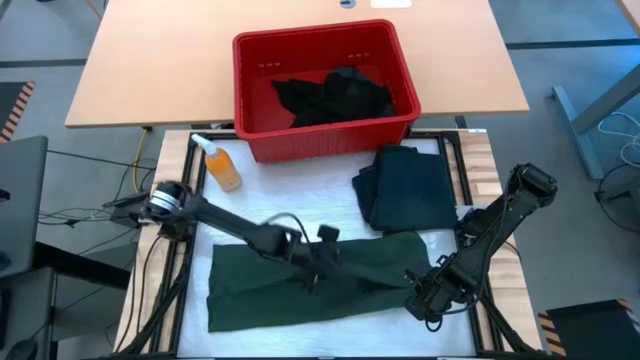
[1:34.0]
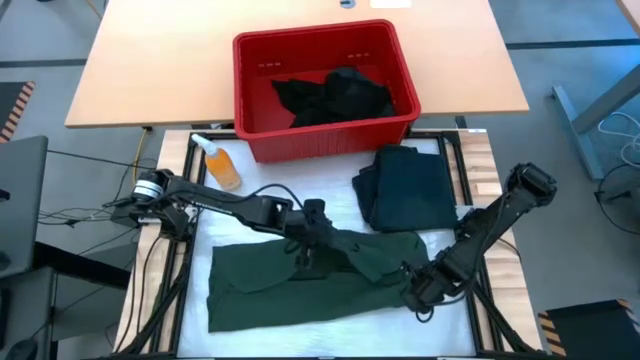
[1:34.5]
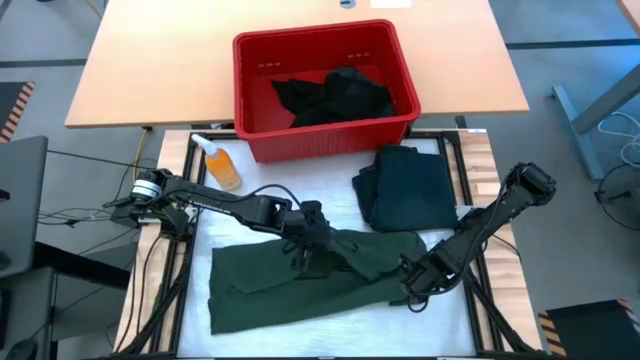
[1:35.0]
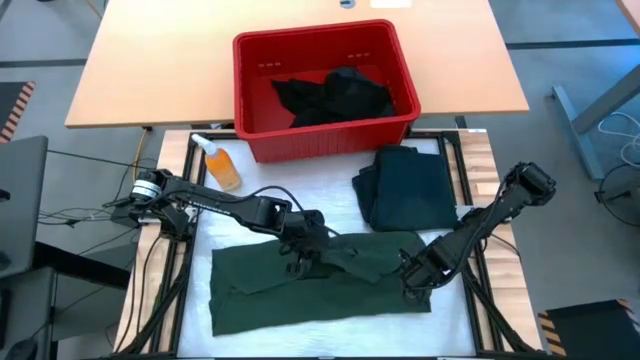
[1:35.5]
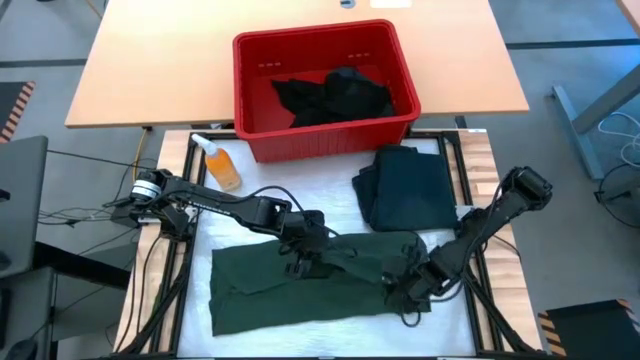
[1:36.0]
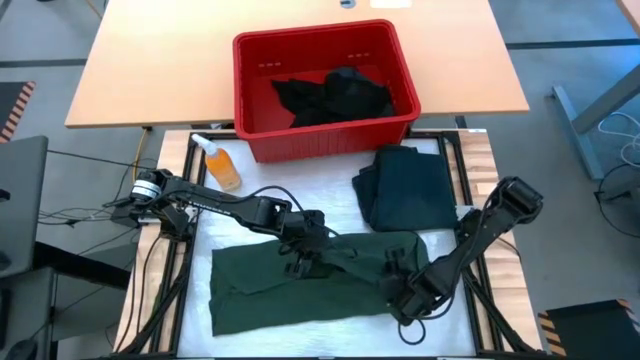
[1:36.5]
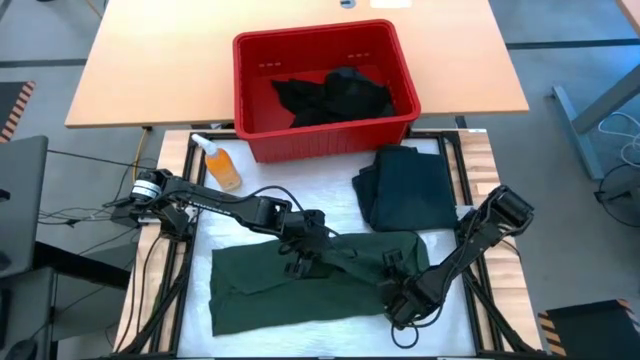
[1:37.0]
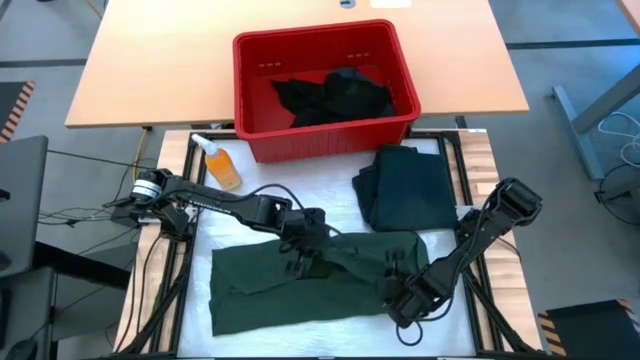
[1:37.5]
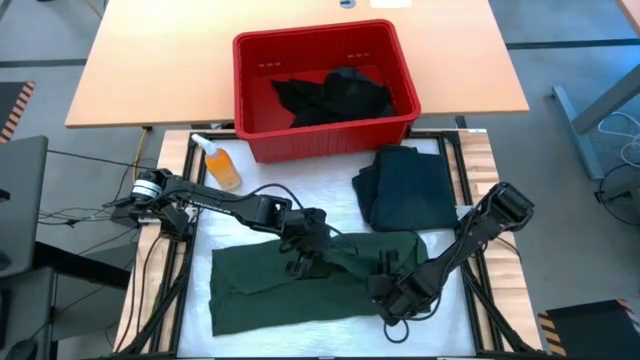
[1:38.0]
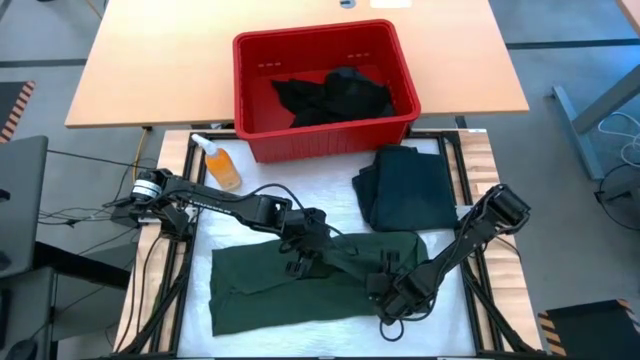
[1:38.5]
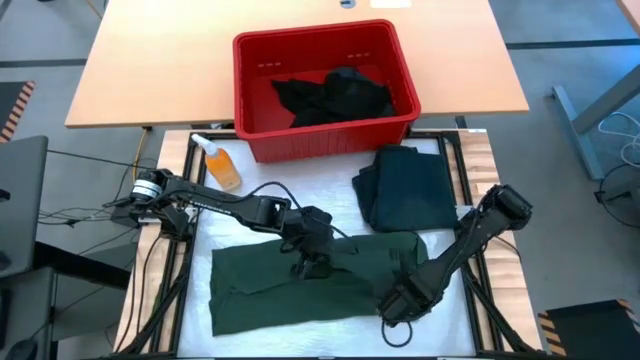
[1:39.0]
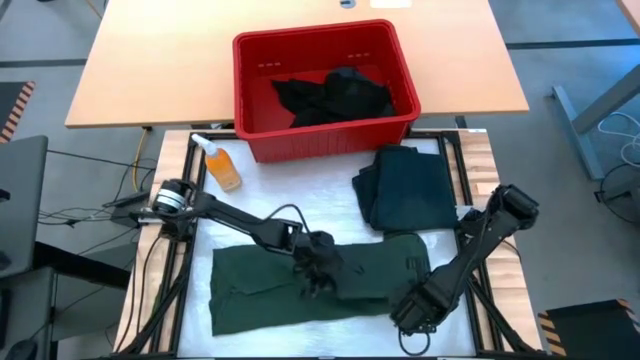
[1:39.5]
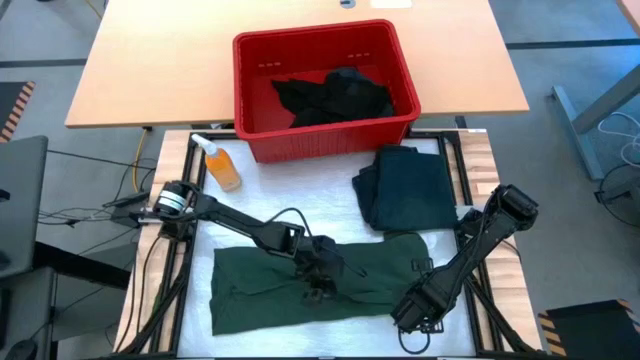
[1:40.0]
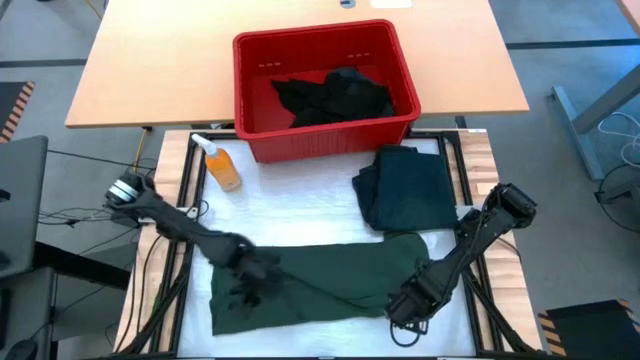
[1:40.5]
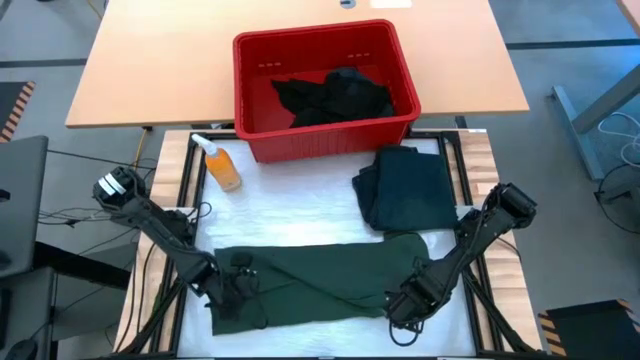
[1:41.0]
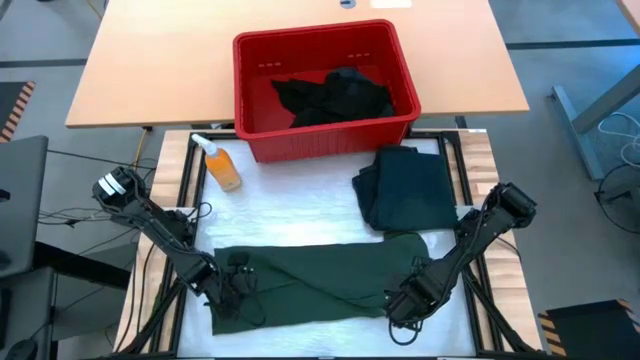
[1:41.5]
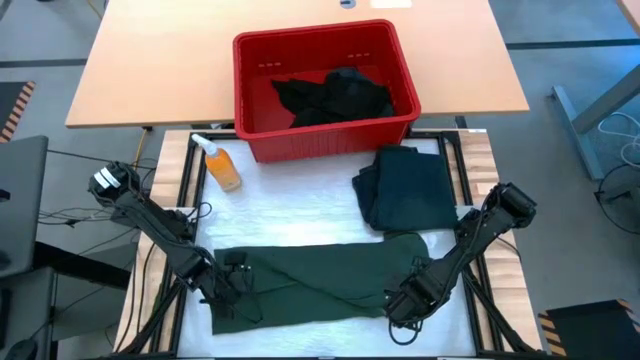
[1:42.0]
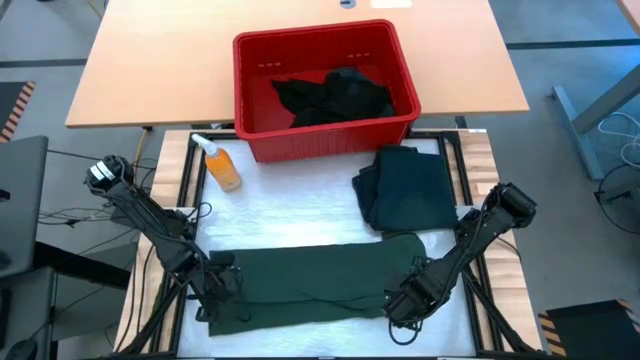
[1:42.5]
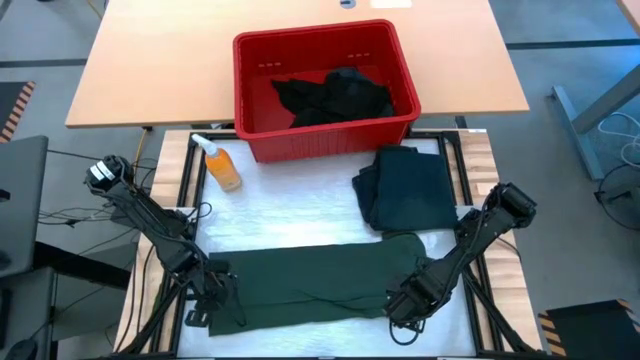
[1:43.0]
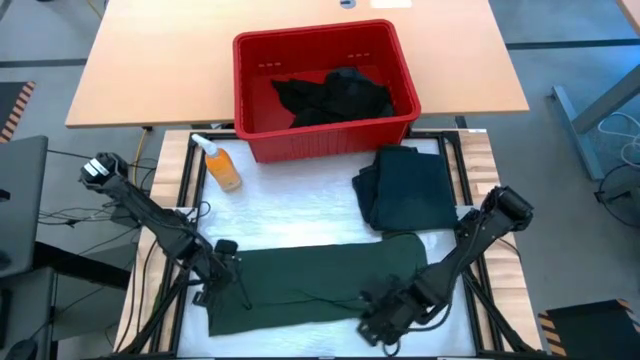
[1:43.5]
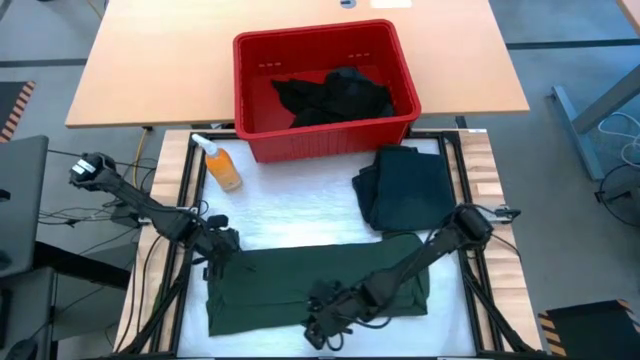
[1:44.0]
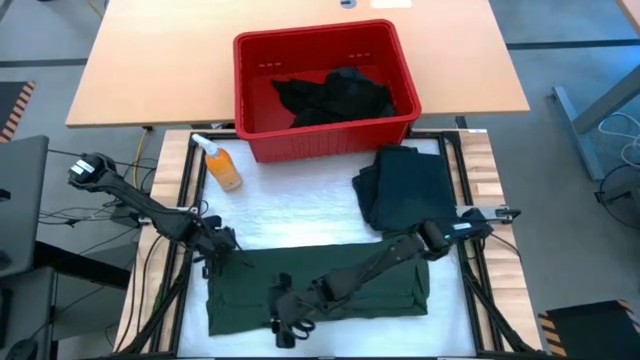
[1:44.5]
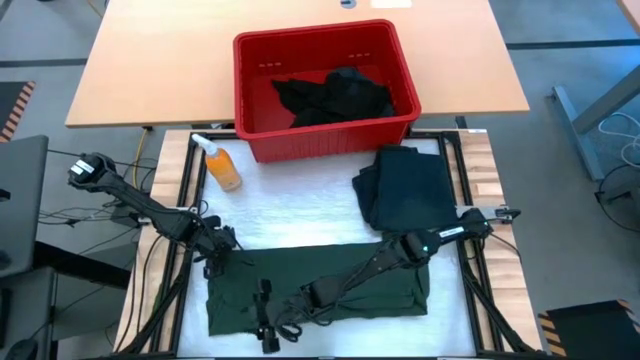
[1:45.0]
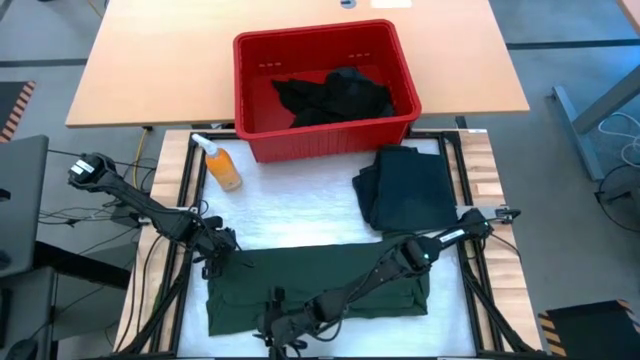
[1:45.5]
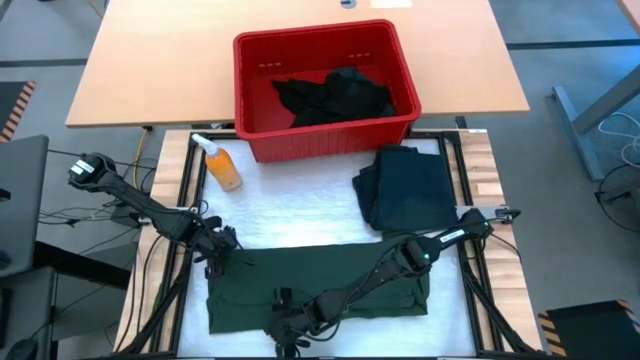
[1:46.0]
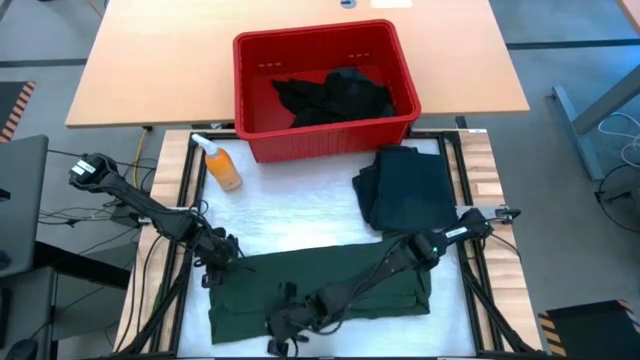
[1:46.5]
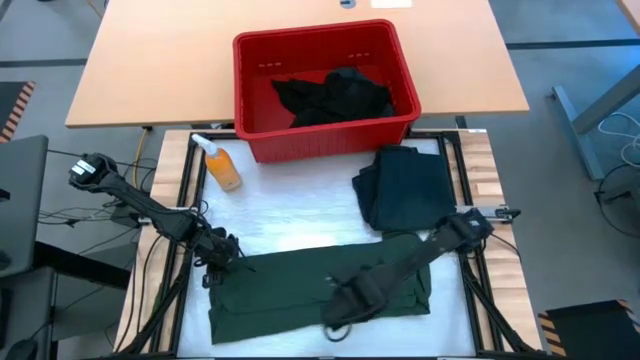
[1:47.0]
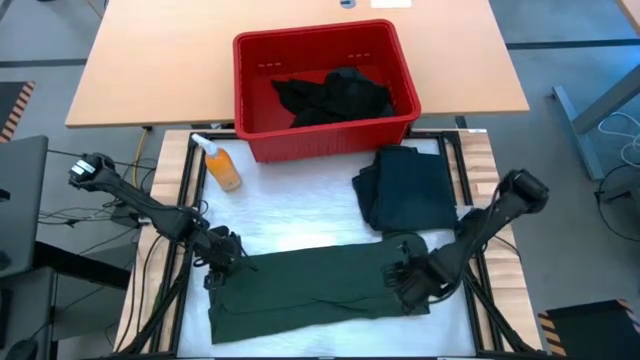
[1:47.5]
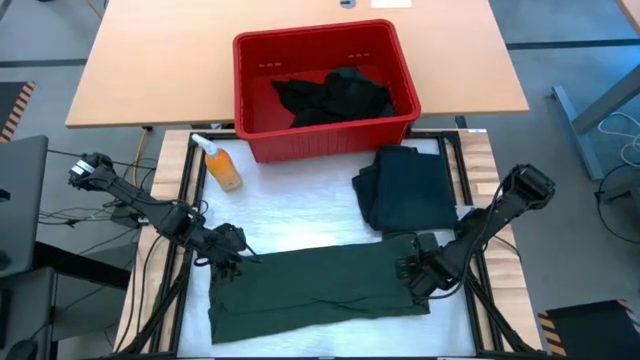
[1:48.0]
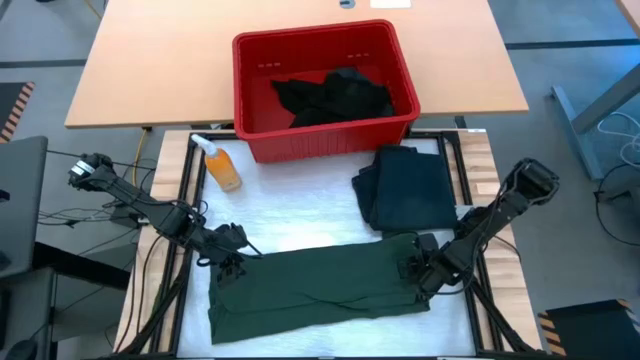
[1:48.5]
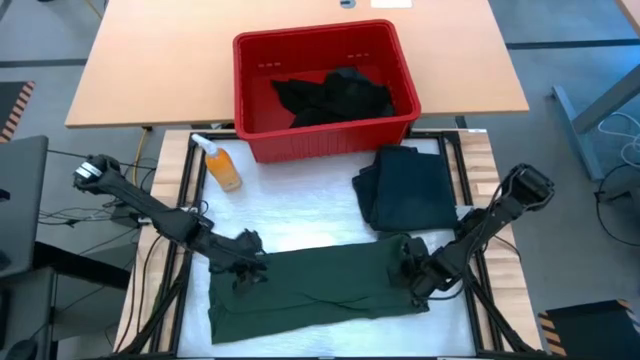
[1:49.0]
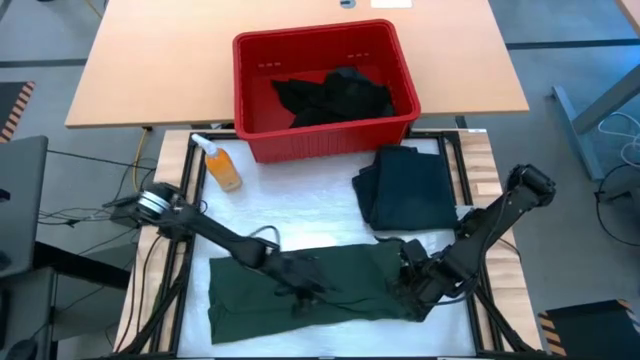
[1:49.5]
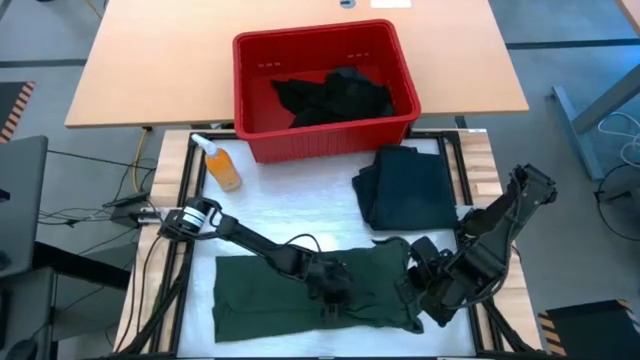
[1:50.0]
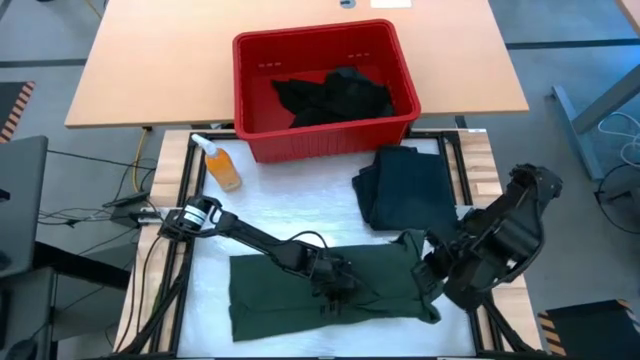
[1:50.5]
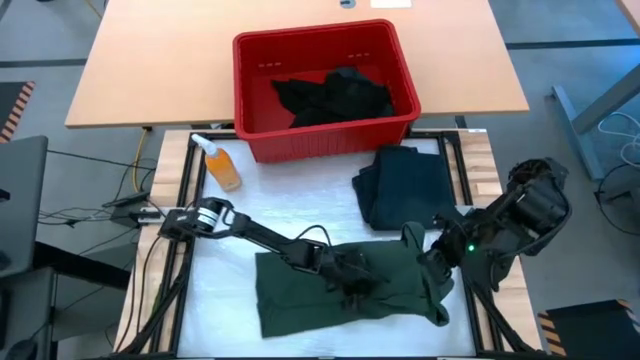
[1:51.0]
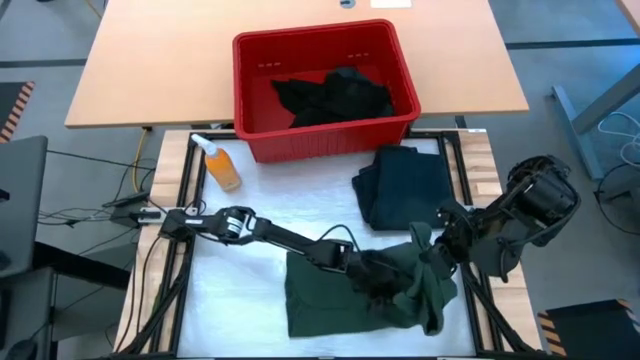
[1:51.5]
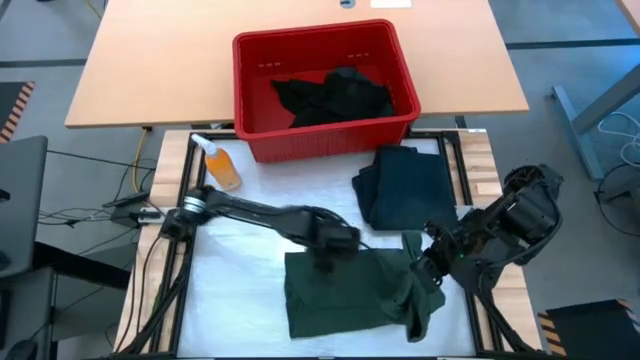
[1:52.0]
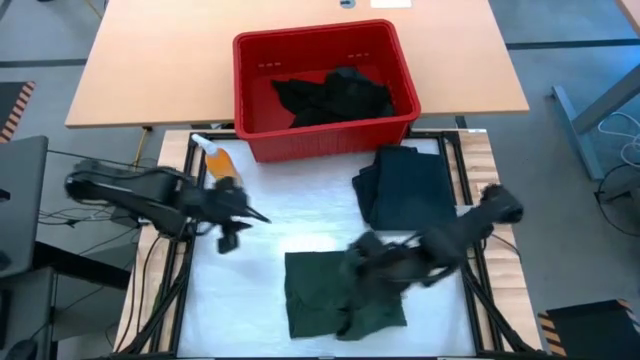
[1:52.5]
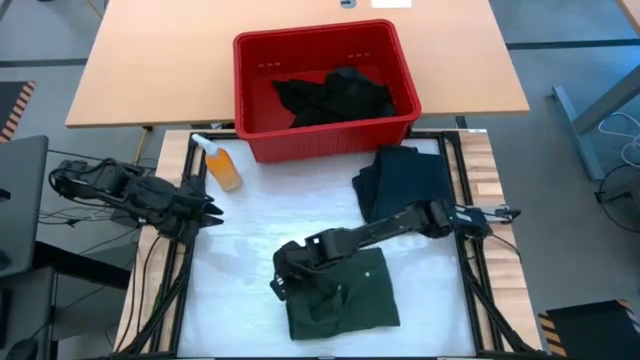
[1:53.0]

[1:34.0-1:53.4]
Task: Fold laundry
Fold the green polo shirt
